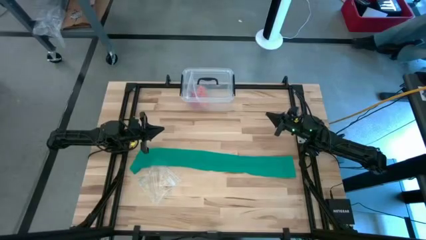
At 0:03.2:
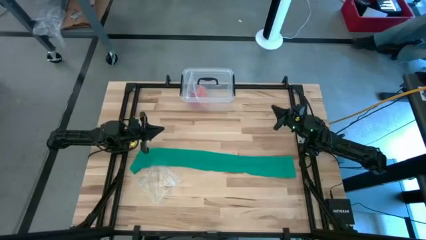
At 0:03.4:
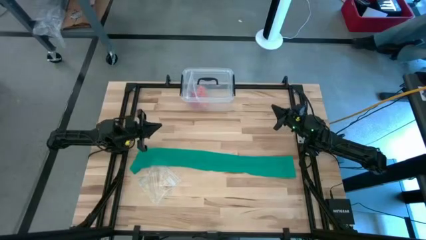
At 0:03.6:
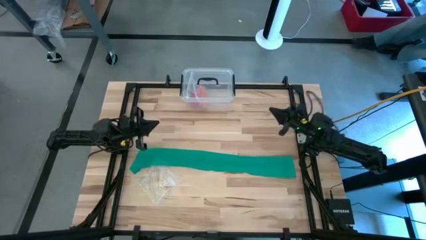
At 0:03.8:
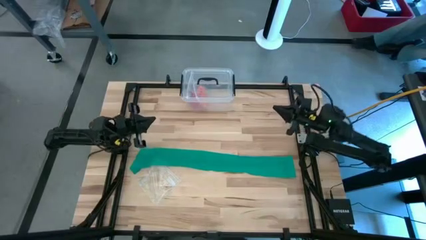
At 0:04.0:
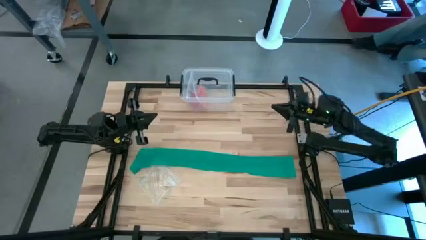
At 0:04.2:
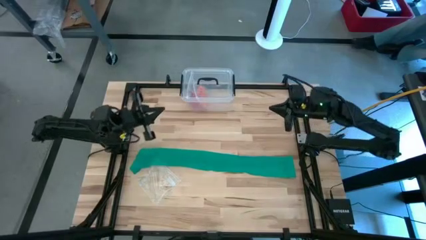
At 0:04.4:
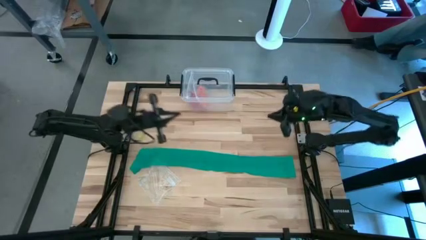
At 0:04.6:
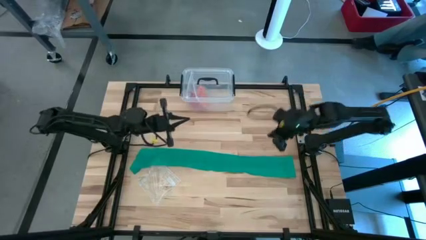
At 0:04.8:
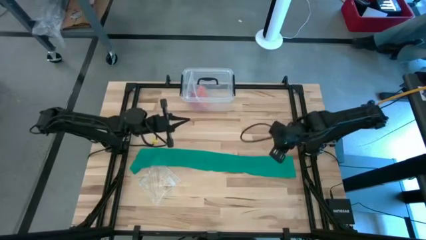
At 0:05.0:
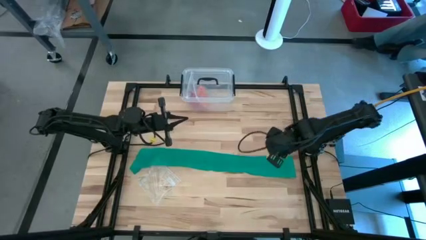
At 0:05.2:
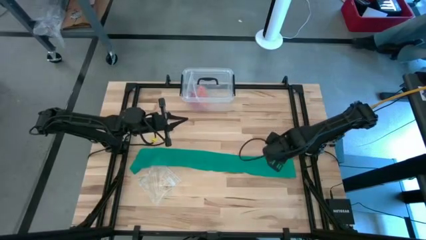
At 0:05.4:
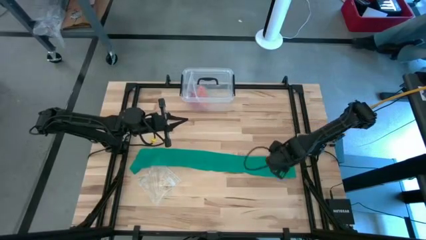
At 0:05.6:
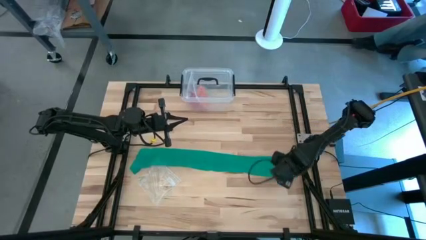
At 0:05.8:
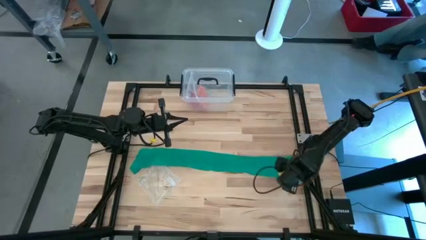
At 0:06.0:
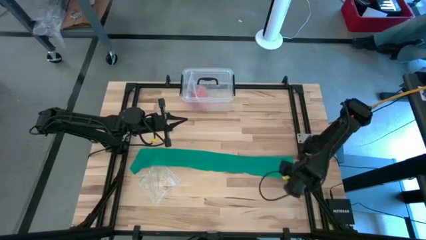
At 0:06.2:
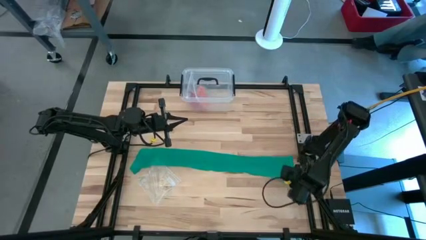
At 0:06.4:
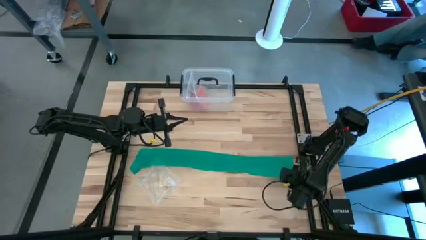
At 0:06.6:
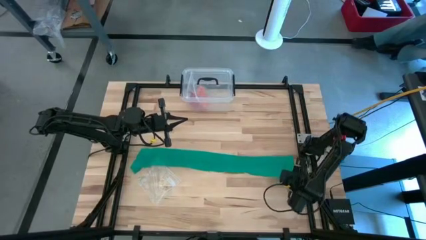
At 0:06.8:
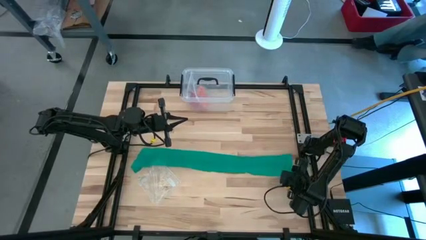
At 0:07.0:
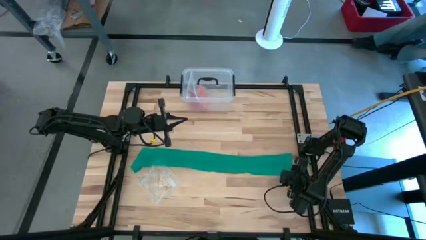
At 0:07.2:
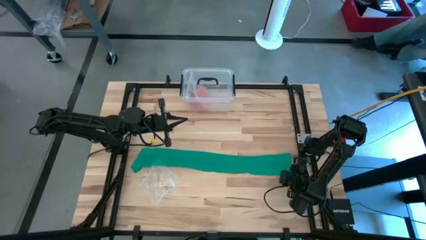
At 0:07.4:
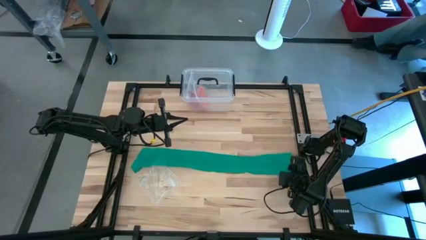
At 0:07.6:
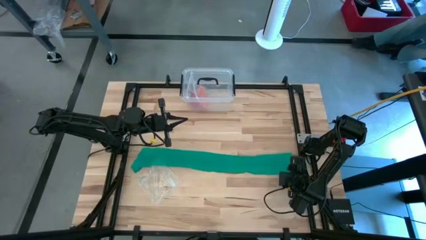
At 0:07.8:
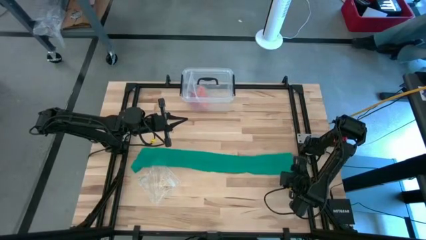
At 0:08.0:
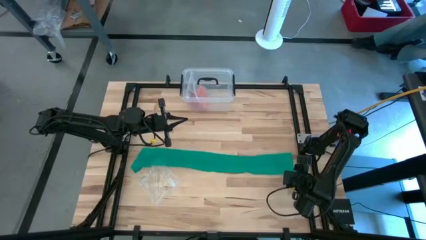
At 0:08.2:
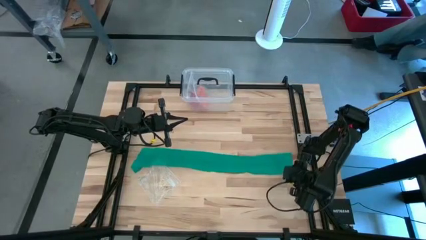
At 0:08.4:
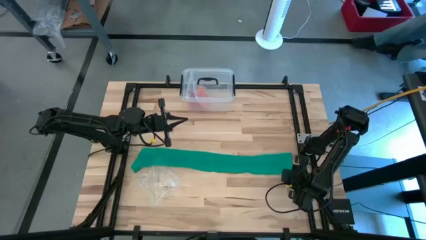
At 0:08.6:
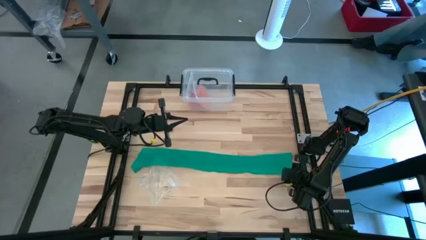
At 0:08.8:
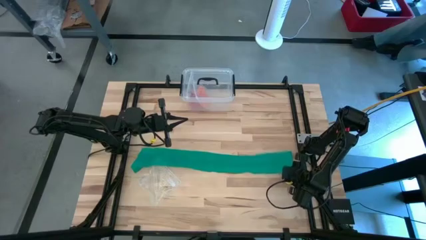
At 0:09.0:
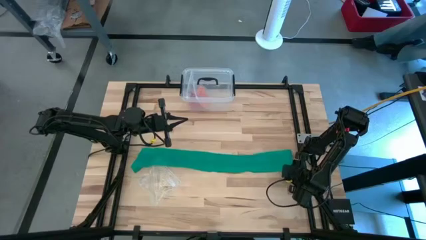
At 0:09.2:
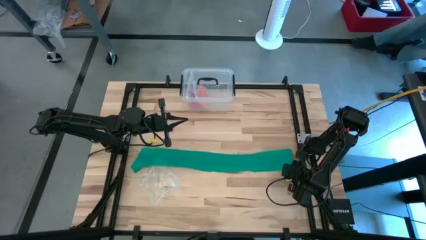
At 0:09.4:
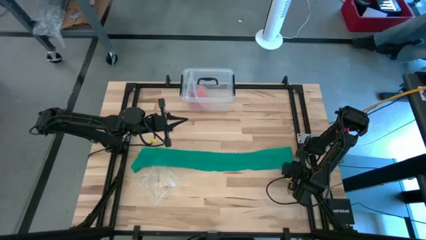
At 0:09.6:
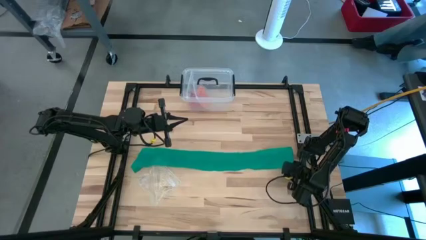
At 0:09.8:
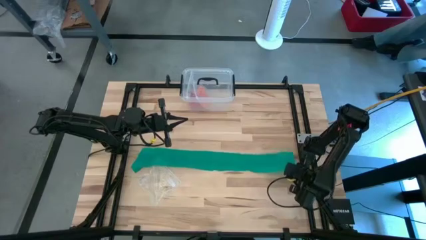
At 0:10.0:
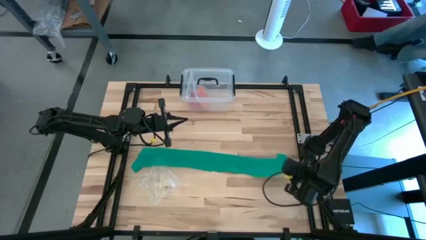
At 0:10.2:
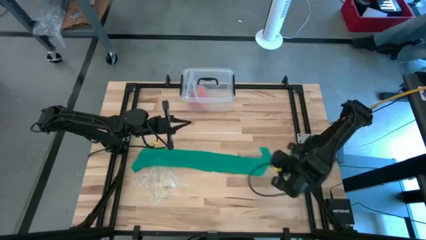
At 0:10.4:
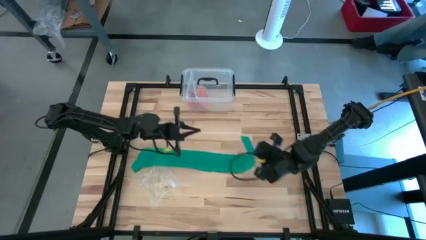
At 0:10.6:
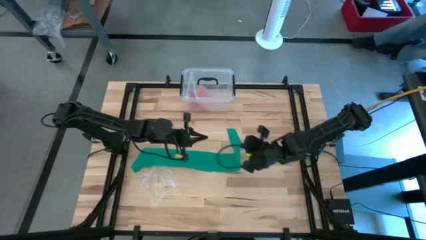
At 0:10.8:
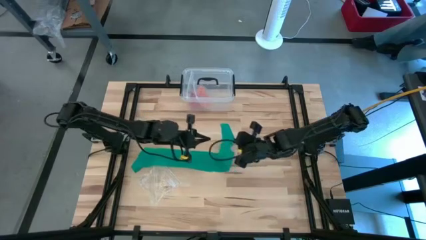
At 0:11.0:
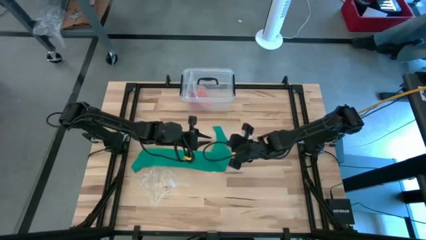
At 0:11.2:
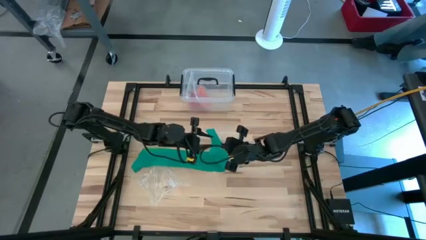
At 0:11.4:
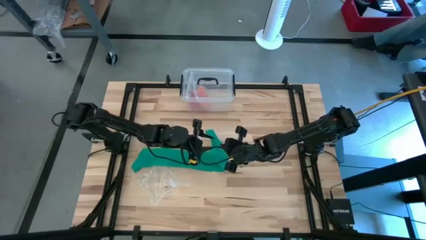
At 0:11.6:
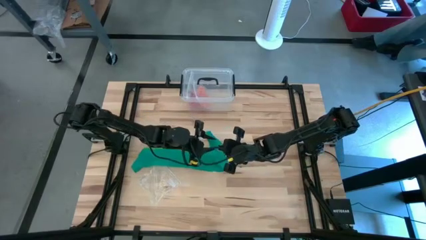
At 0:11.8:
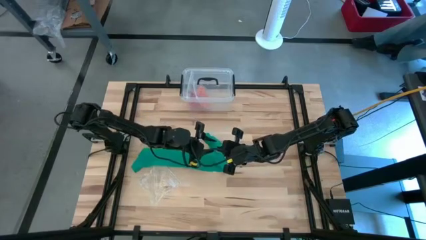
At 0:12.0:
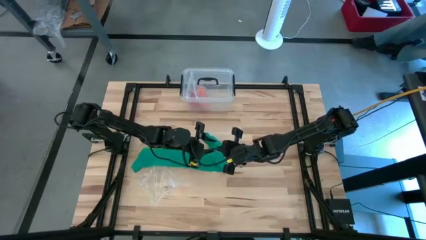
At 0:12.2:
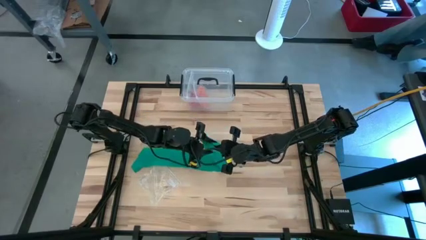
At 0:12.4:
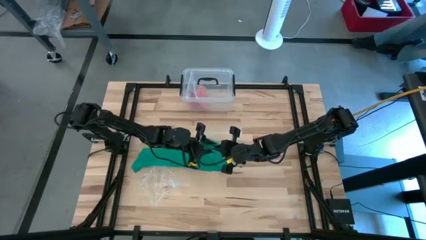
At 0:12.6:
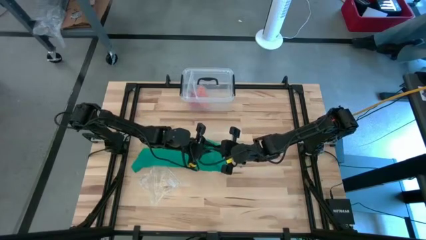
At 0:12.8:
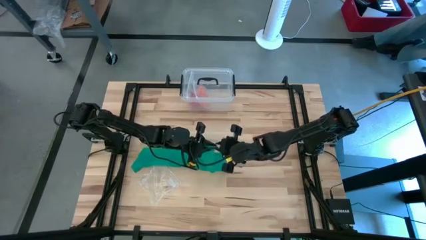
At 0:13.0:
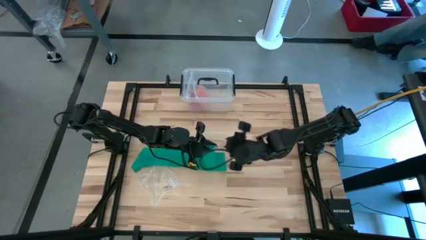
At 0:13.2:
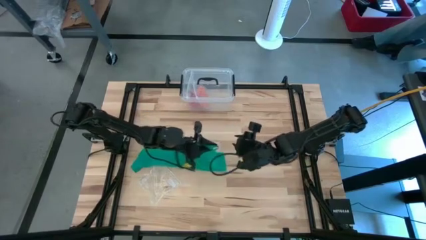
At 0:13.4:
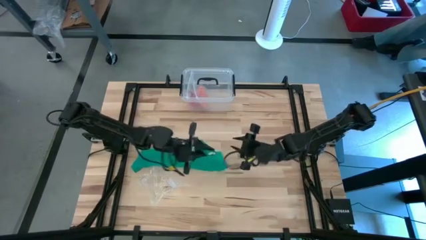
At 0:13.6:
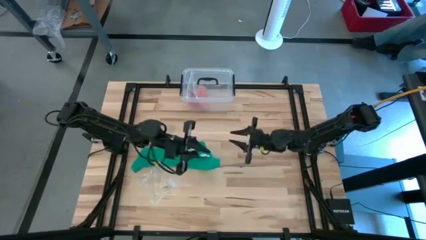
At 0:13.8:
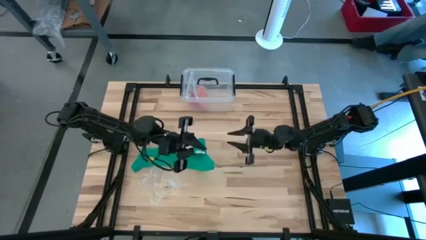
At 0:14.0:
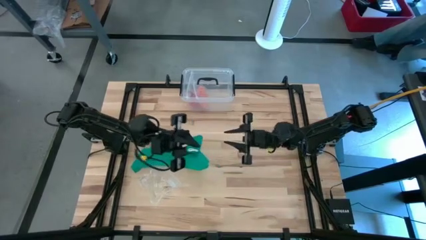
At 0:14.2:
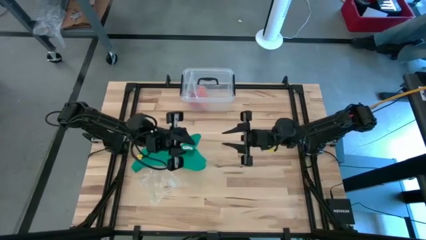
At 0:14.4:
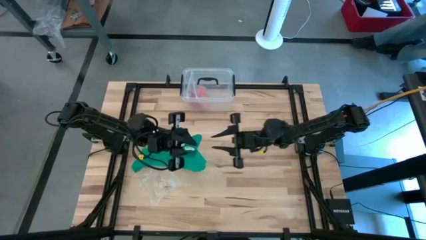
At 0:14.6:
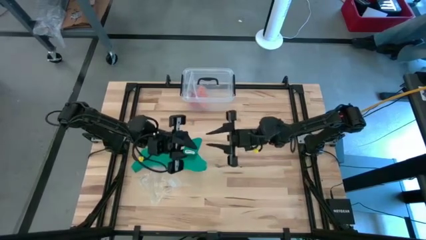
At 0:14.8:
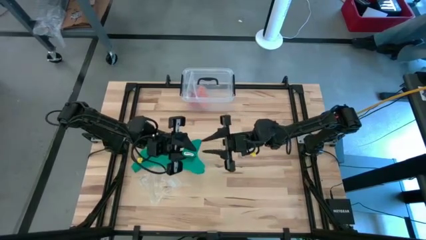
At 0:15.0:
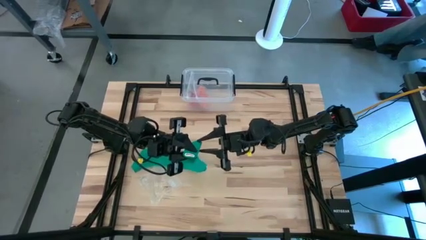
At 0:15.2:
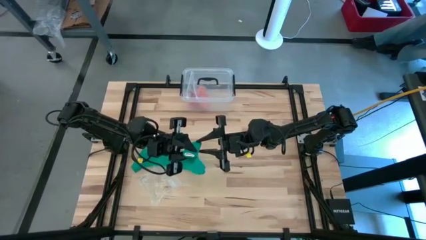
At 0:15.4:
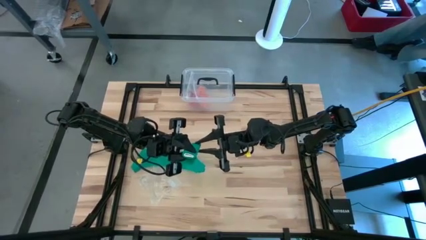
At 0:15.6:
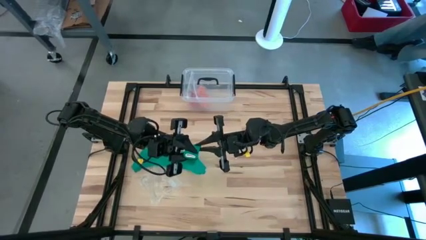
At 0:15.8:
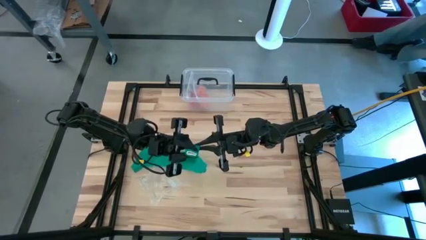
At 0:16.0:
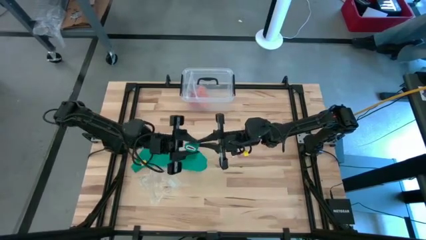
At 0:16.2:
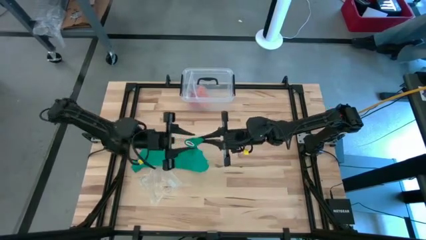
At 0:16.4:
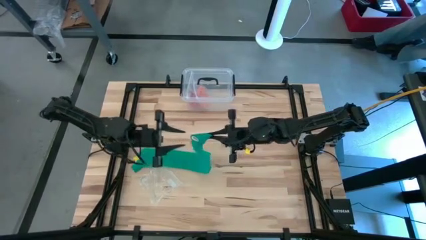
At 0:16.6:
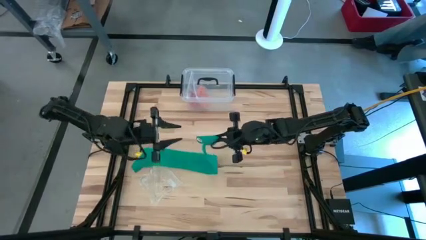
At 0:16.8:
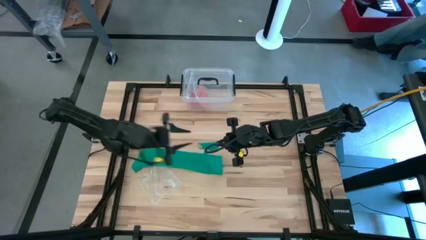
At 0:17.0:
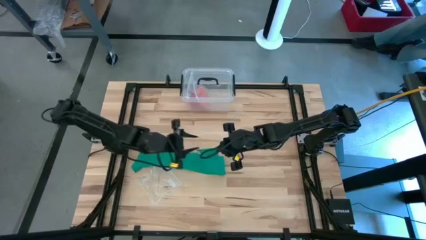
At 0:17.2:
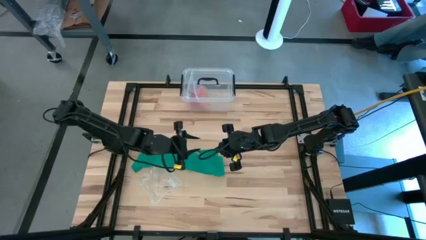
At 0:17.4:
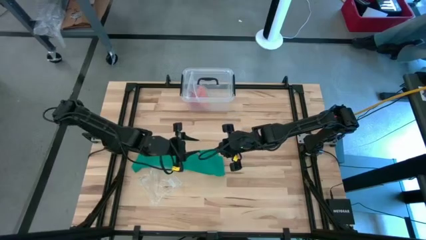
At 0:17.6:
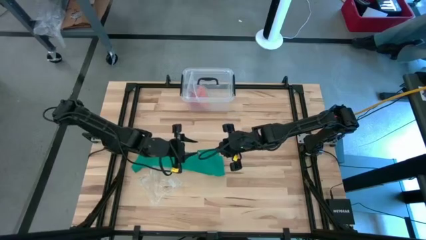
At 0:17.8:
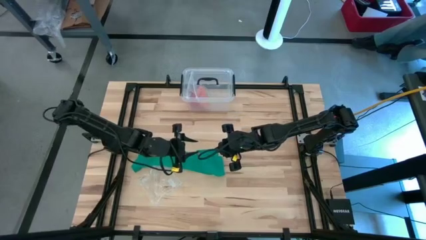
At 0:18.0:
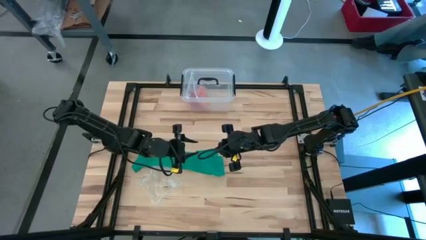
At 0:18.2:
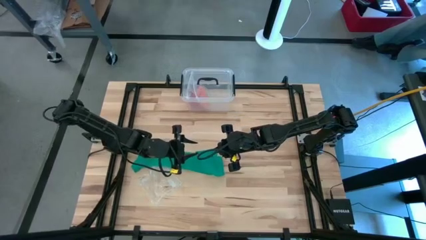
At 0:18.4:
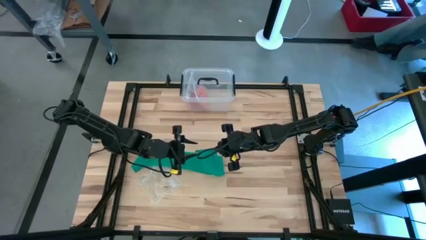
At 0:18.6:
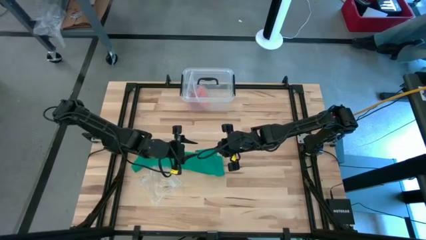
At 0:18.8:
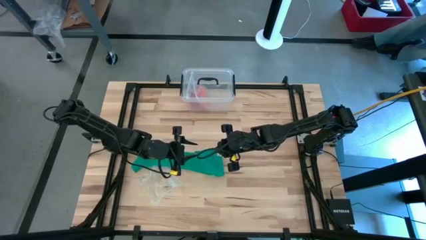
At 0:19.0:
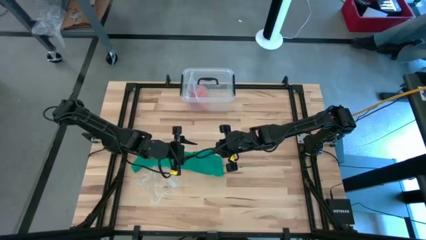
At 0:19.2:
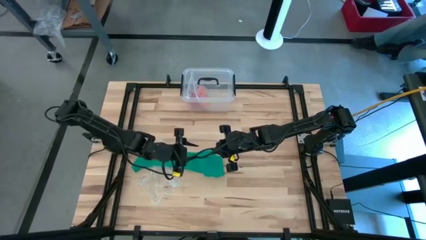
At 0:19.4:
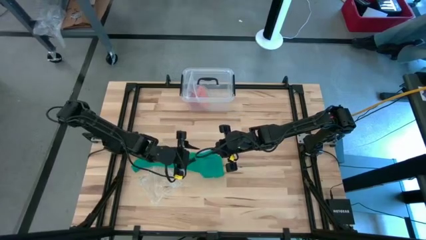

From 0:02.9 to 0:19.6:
Task: Roll bandage
Roll the green bandage
